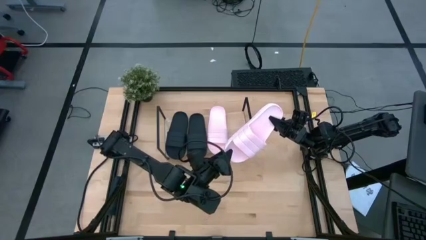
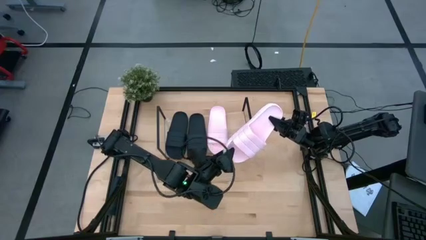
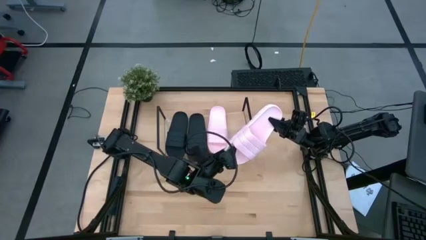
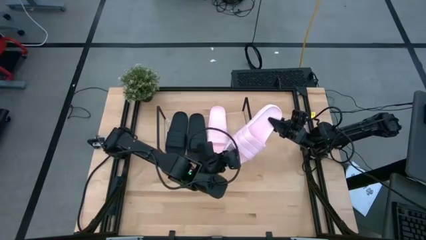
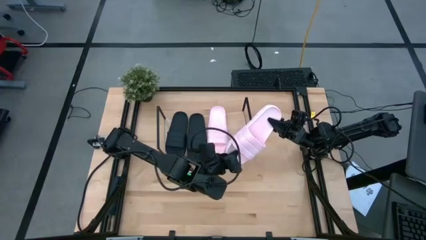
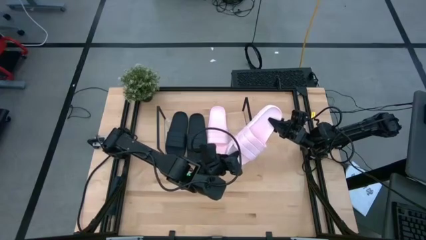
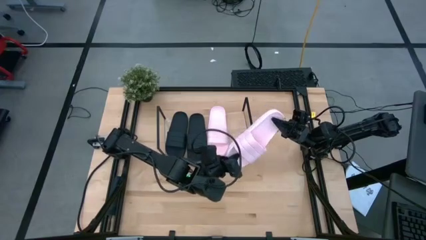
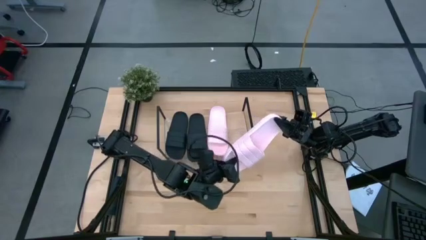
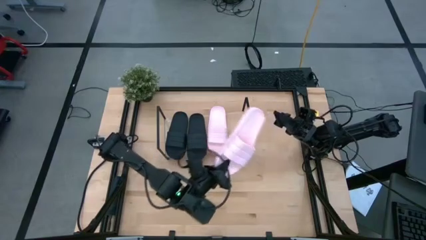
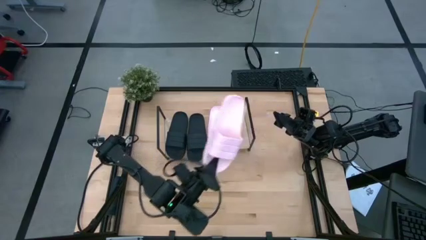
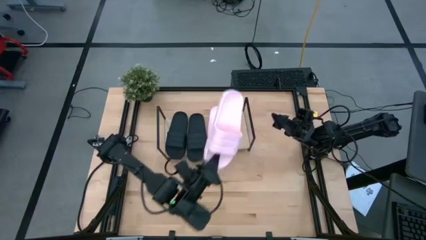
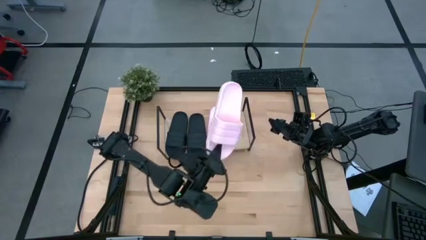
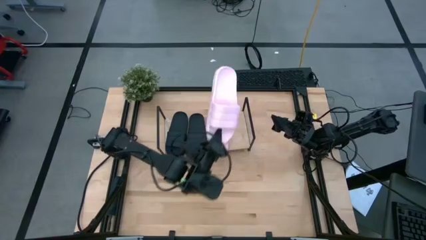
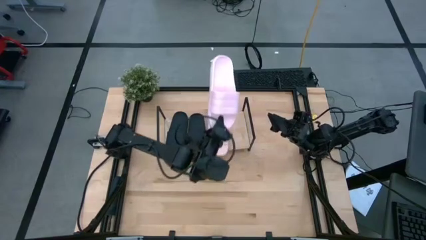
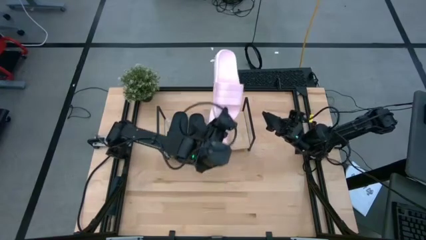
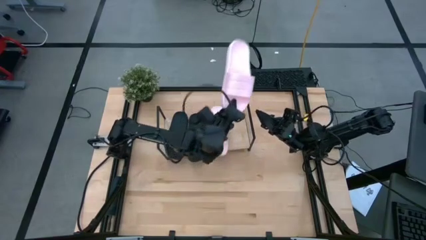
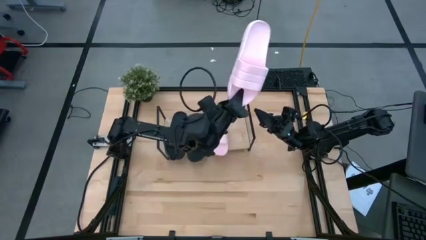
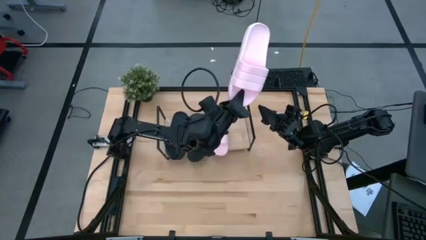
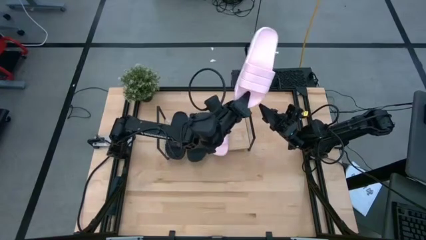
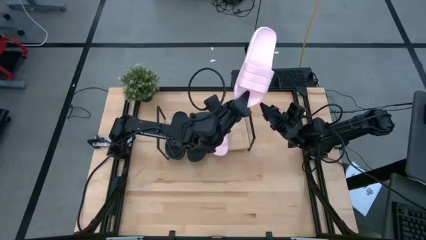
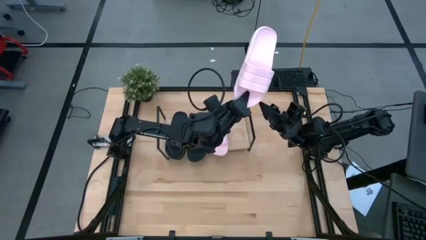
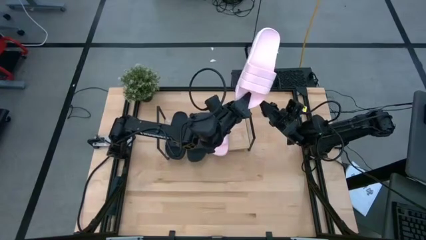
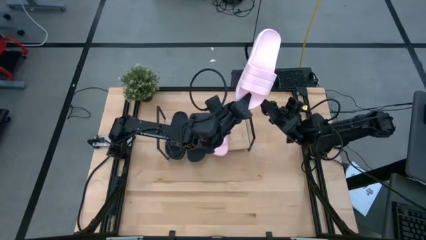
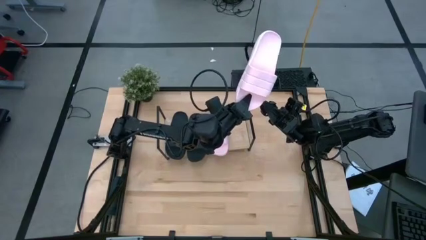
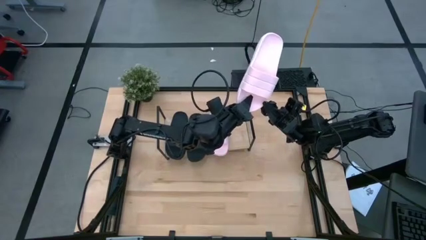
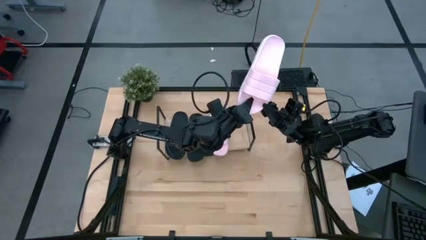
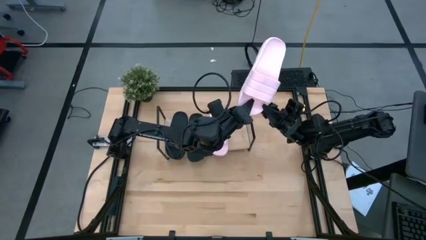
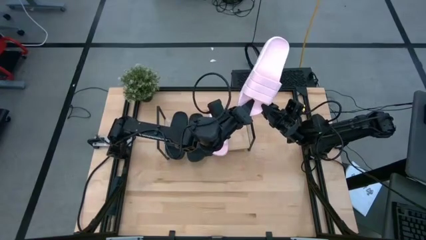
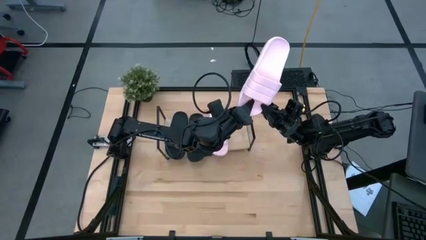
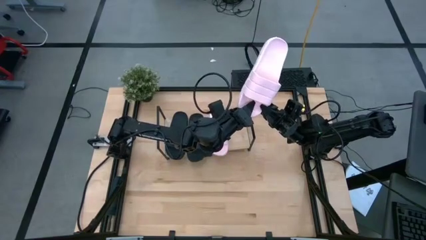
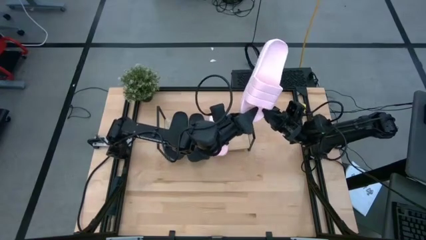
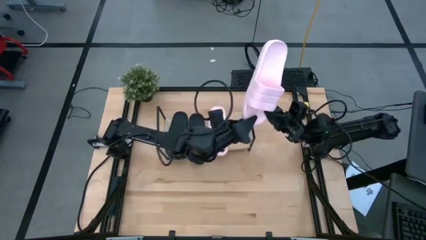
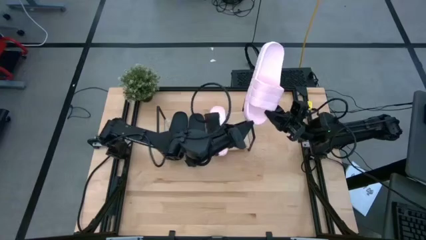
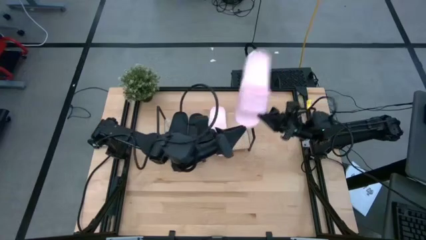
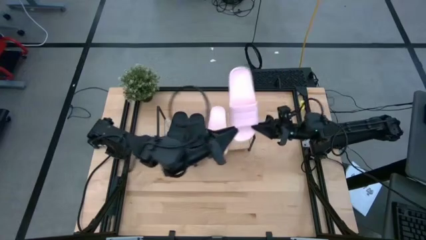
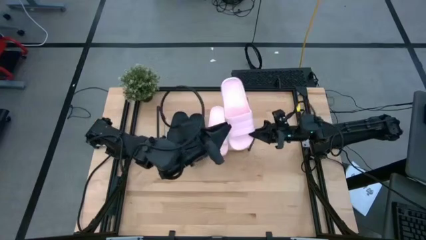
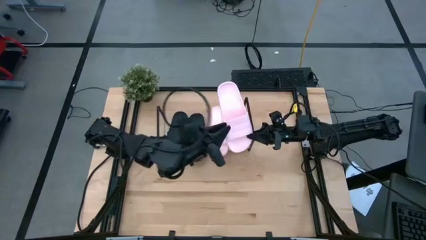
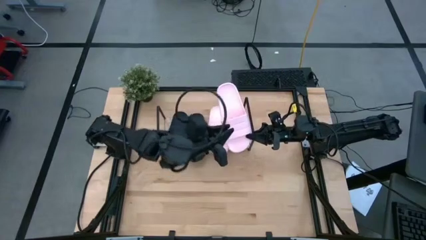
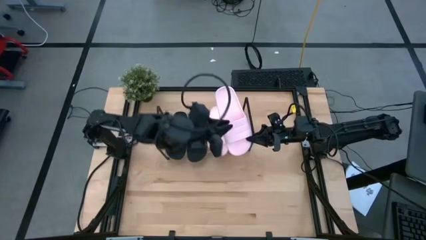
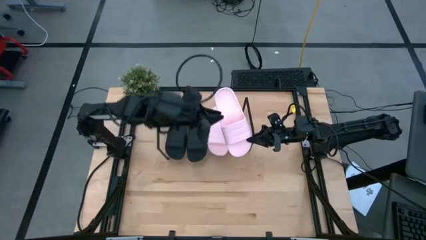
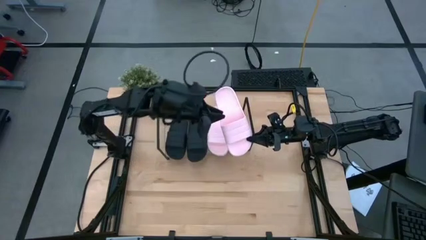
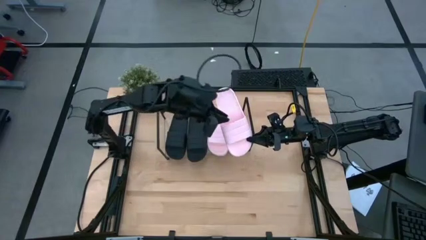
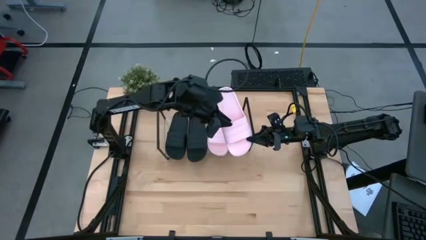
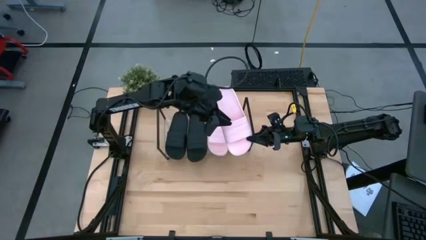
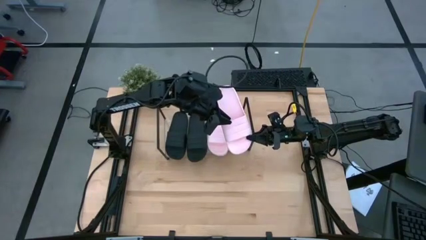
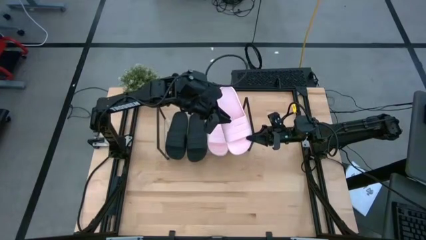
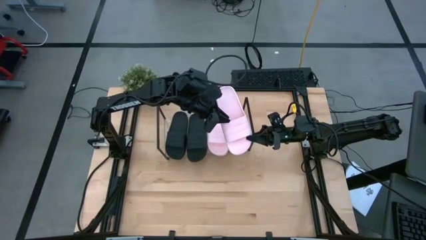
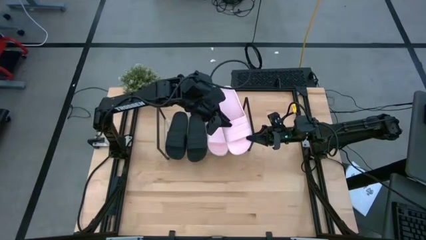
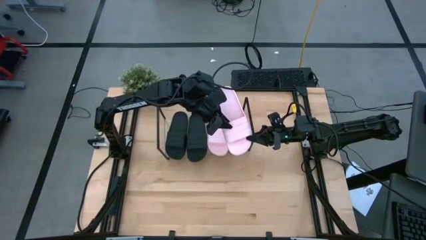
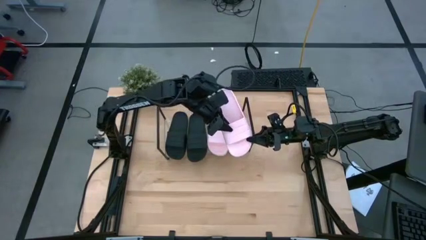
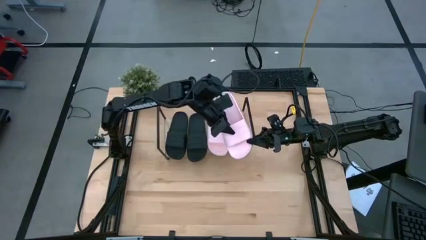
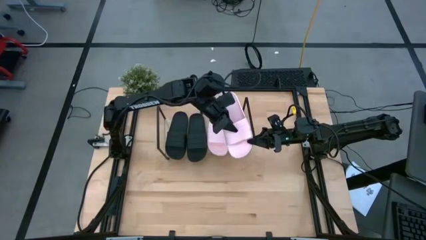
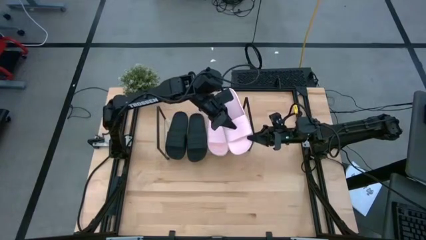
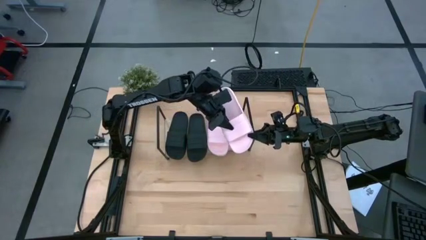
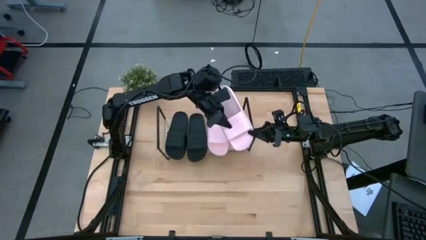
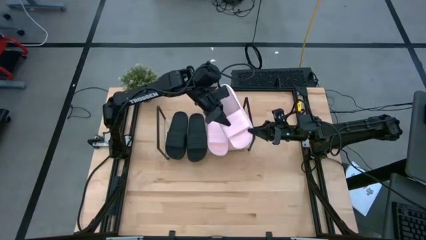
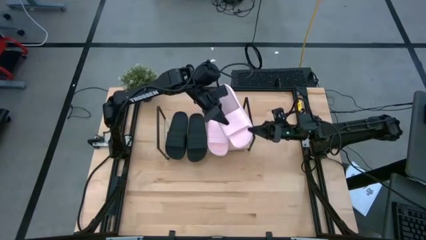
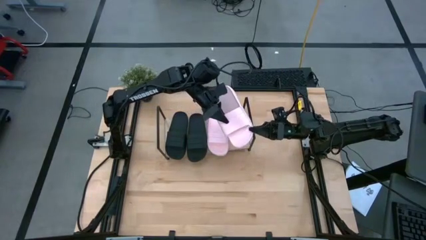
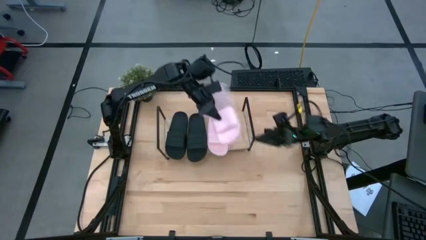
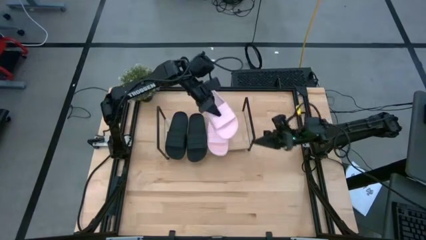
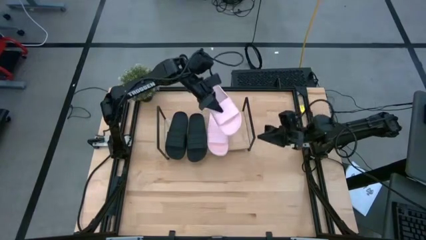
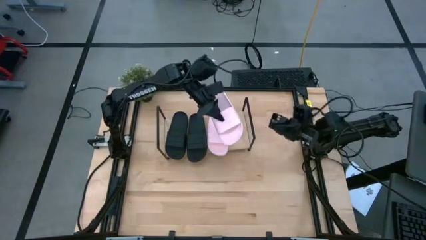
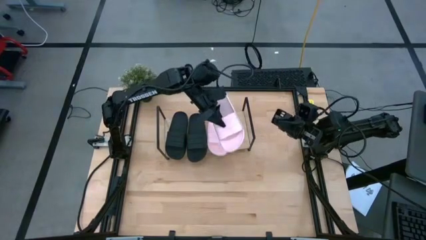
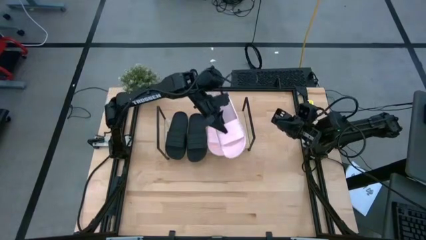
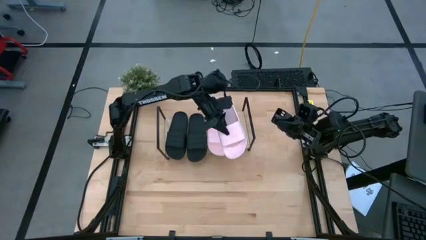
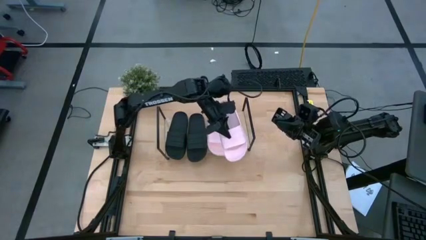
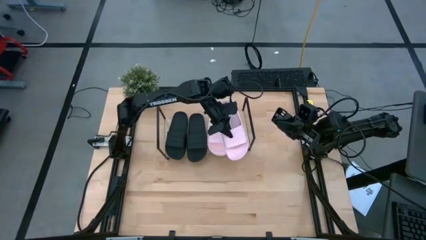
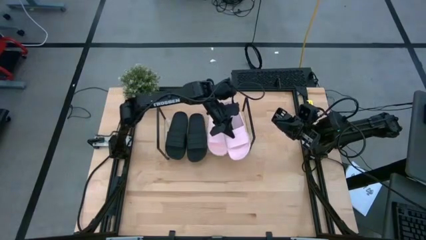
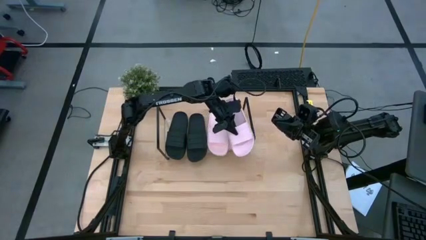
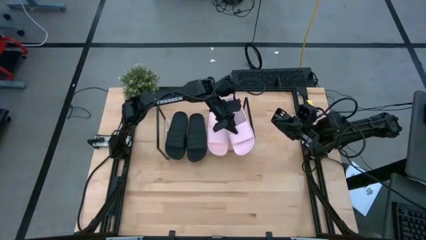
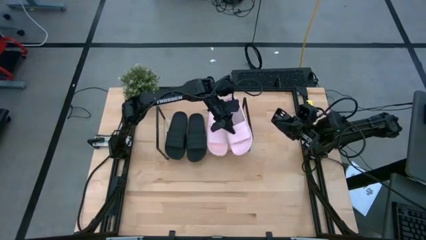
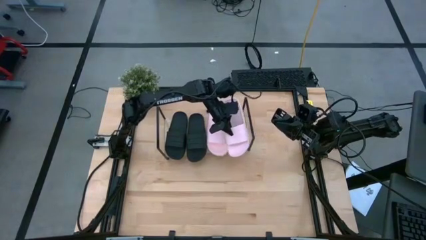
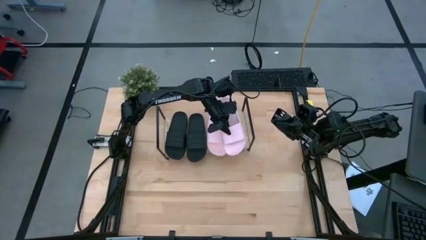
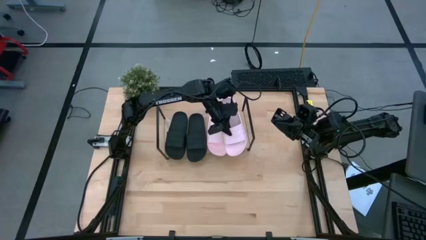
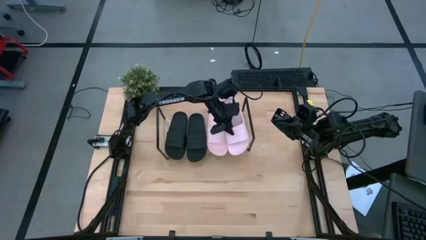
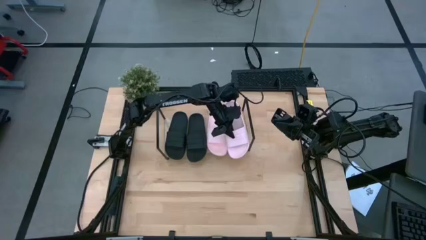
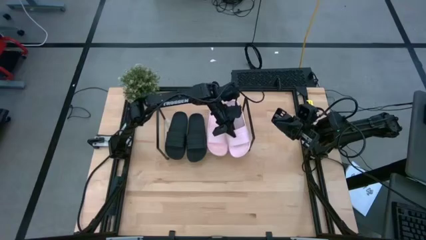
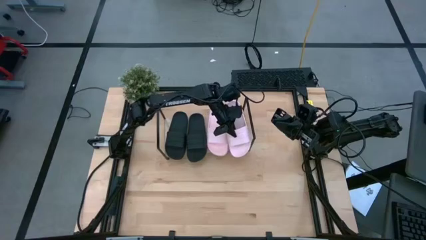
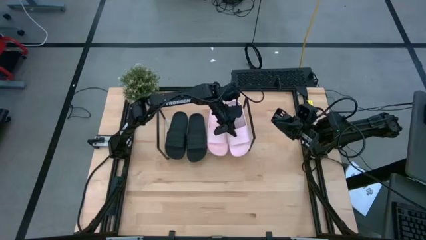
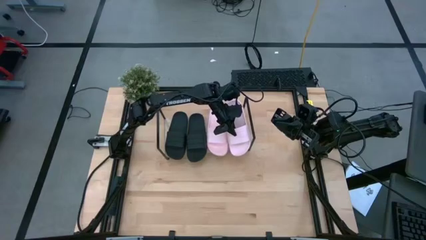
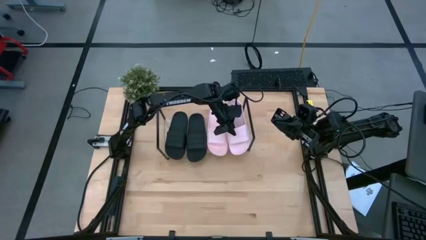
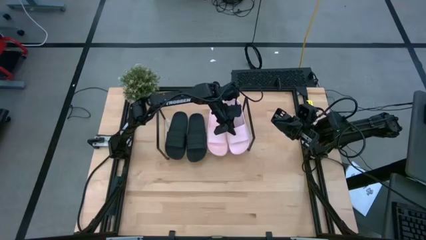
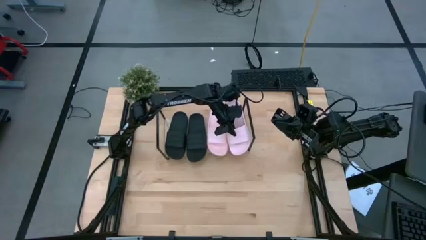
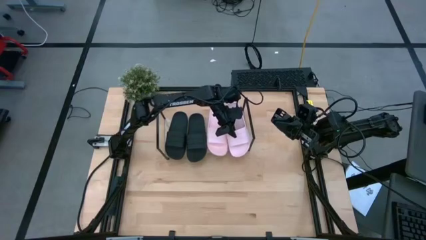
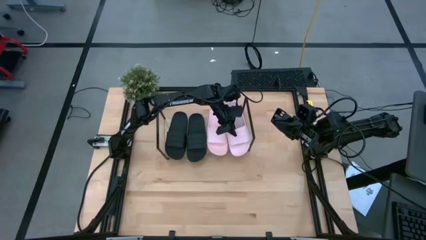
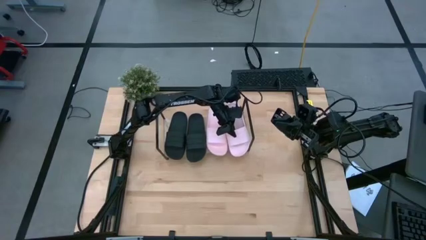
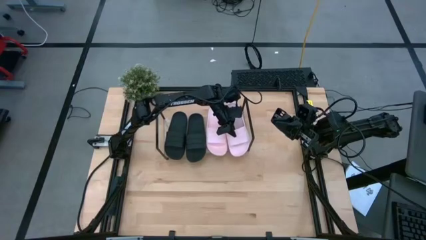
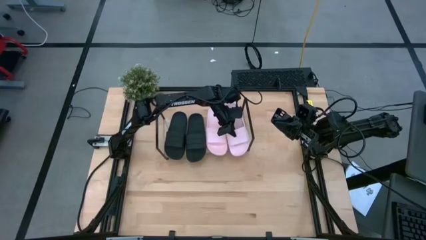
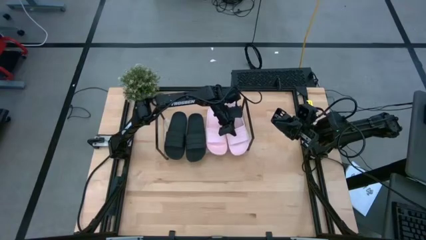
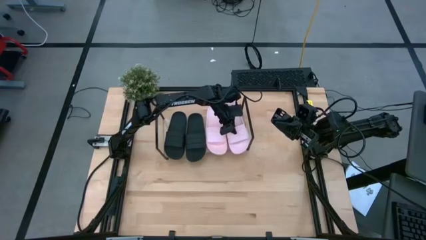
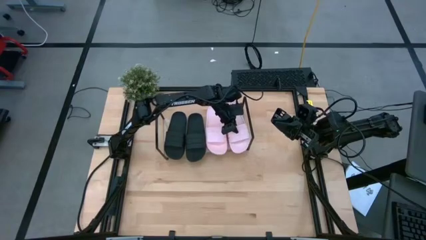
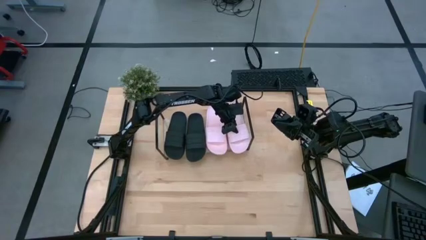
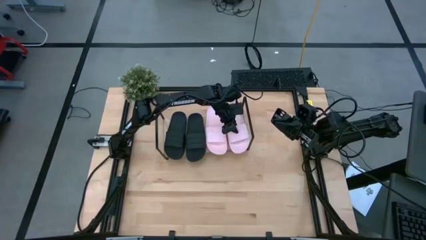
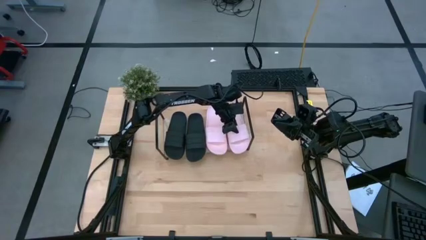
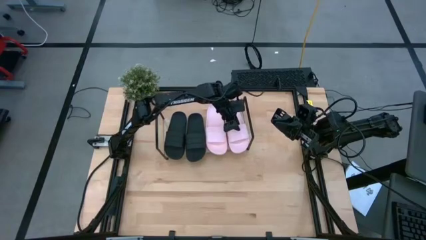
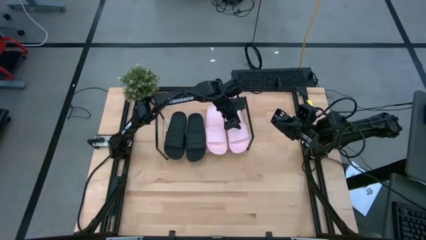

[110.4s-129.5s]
Task: Pick and place slides into the shelf
Put the pink pair of slide on the shelf
